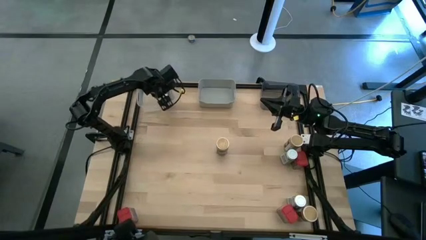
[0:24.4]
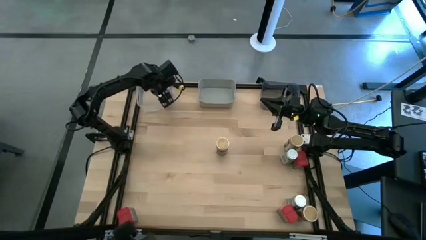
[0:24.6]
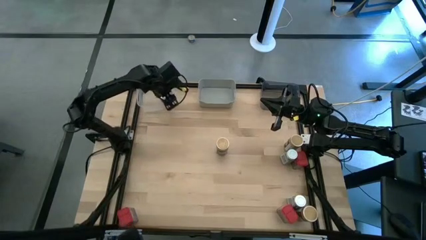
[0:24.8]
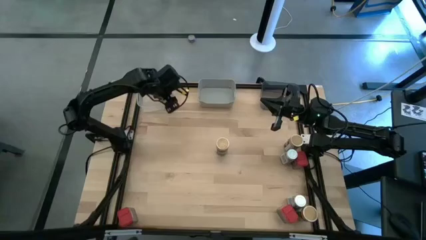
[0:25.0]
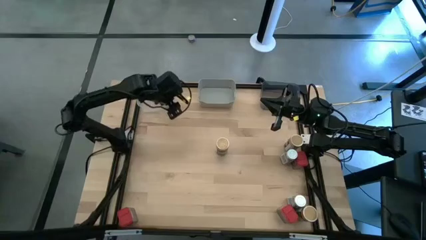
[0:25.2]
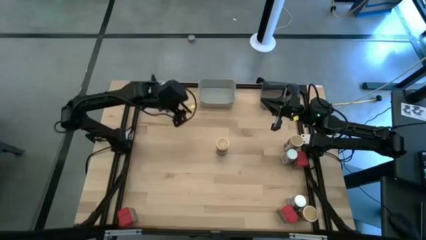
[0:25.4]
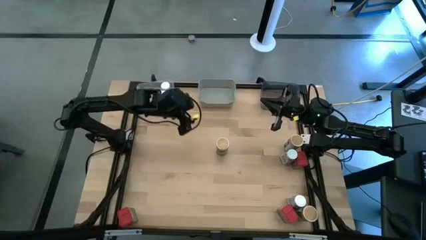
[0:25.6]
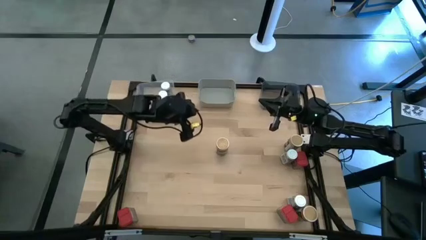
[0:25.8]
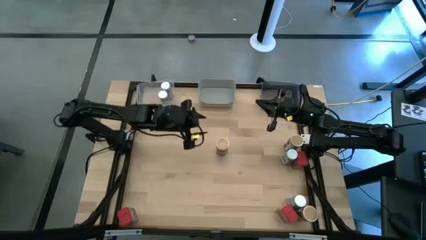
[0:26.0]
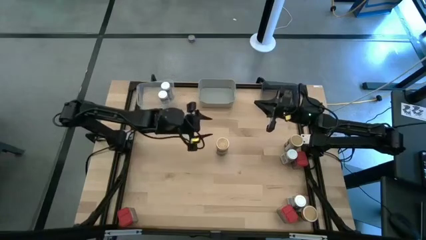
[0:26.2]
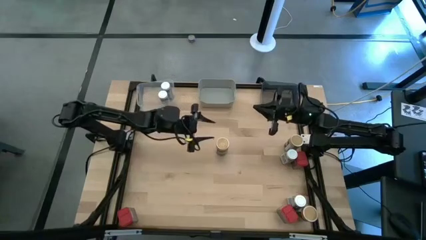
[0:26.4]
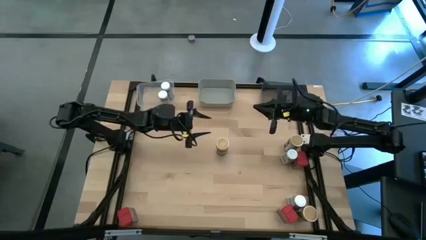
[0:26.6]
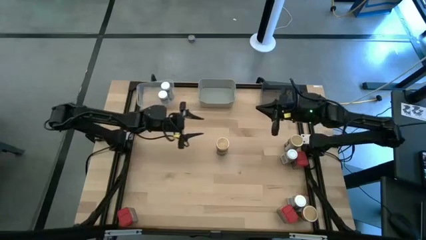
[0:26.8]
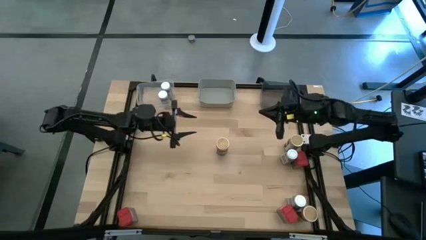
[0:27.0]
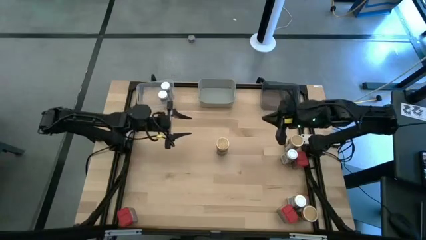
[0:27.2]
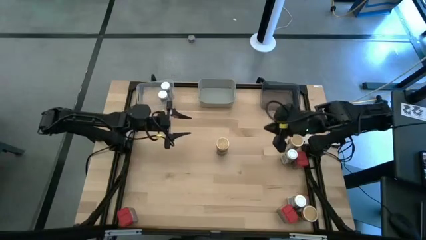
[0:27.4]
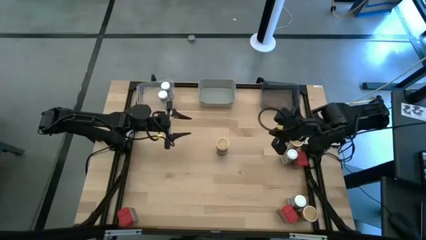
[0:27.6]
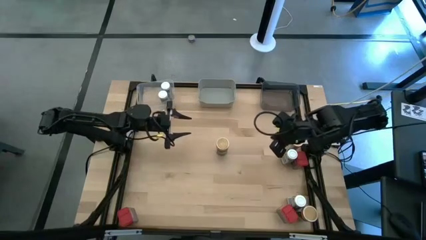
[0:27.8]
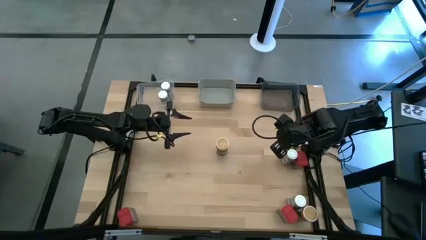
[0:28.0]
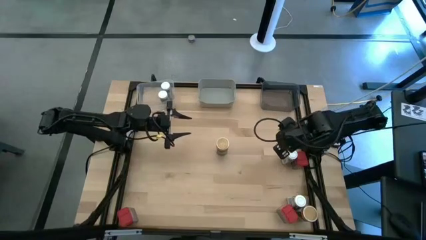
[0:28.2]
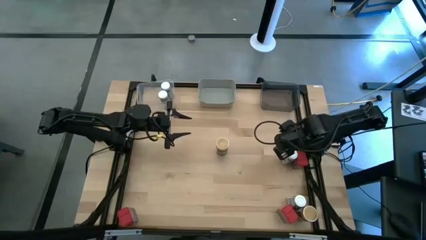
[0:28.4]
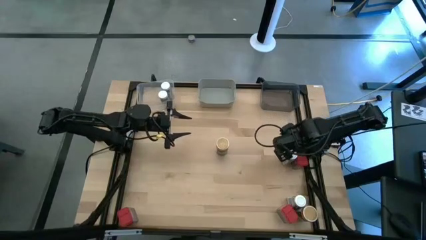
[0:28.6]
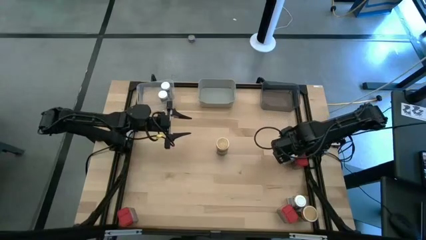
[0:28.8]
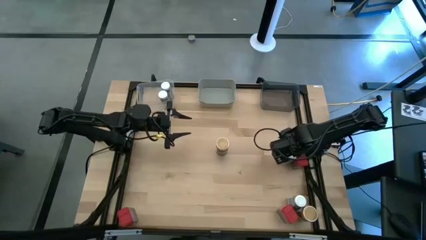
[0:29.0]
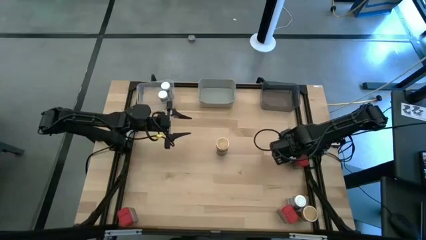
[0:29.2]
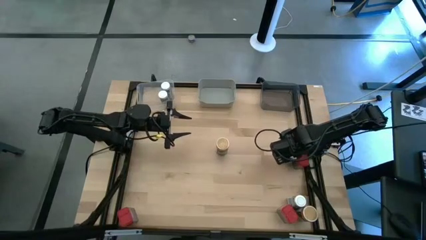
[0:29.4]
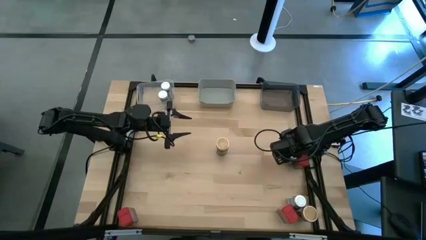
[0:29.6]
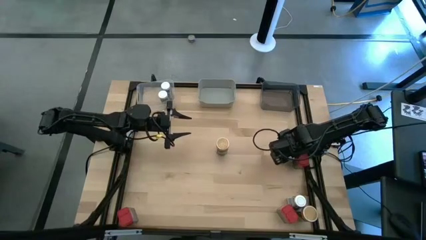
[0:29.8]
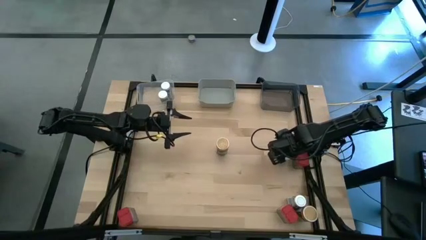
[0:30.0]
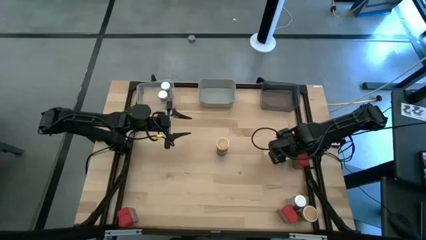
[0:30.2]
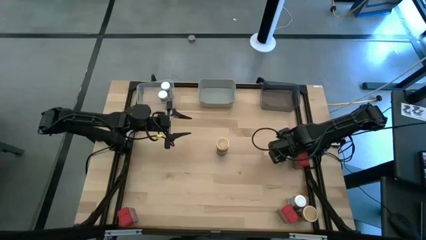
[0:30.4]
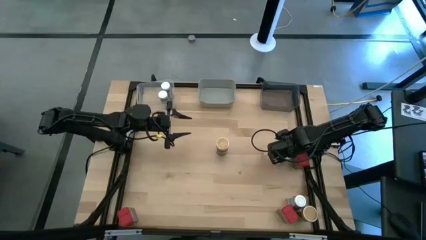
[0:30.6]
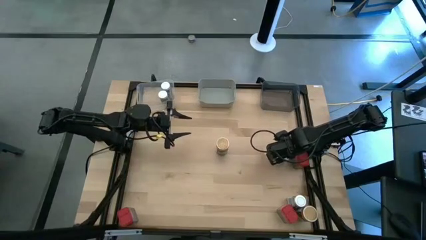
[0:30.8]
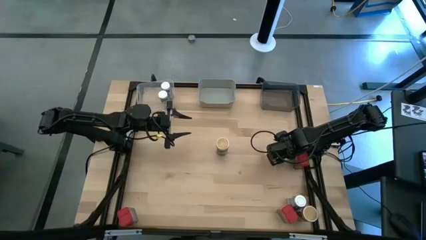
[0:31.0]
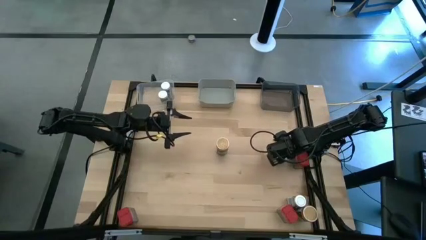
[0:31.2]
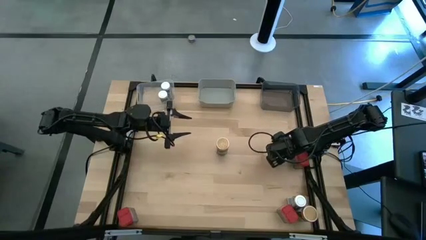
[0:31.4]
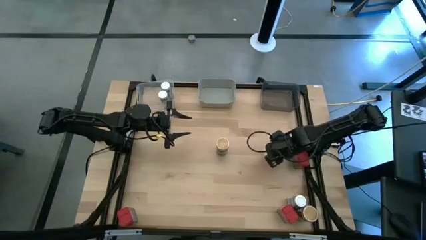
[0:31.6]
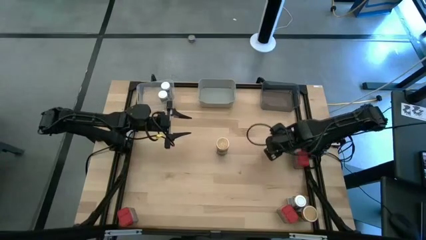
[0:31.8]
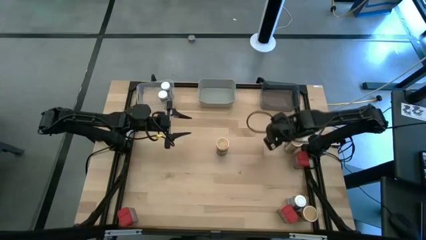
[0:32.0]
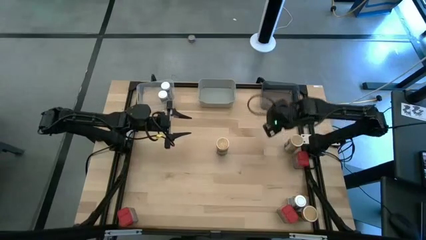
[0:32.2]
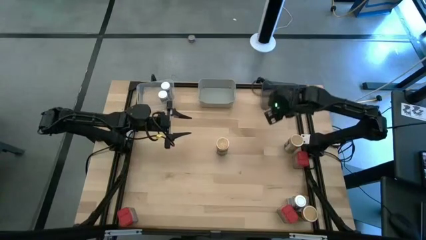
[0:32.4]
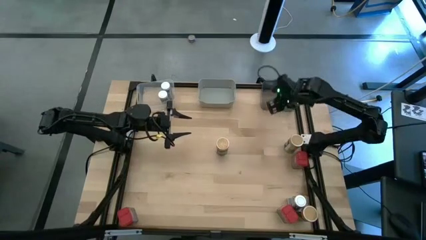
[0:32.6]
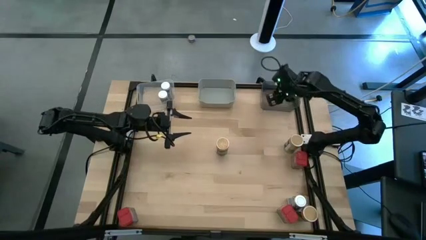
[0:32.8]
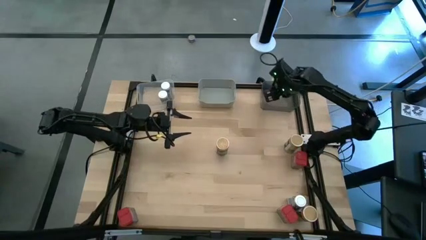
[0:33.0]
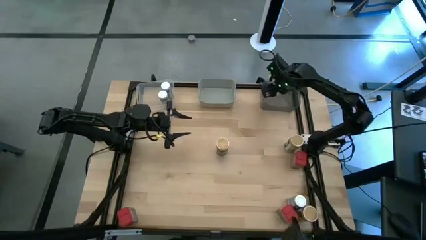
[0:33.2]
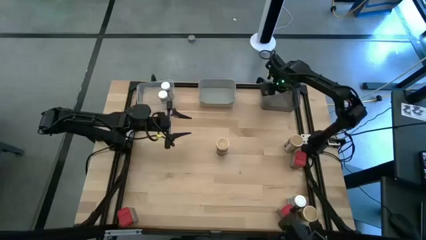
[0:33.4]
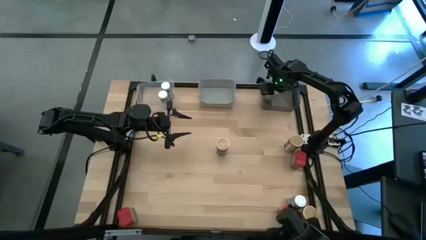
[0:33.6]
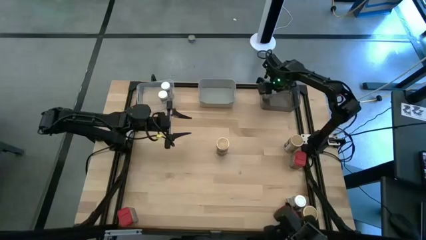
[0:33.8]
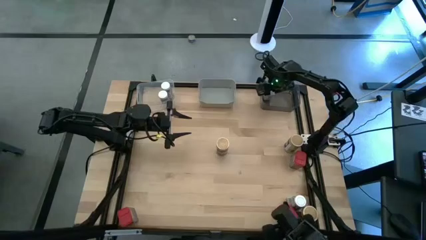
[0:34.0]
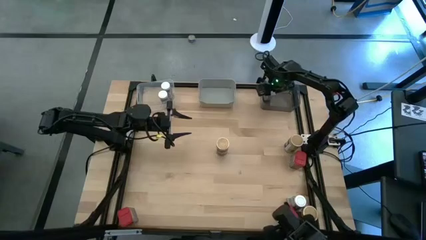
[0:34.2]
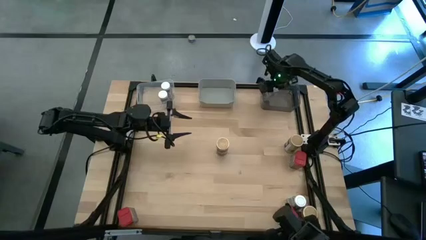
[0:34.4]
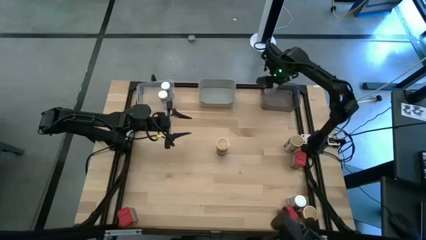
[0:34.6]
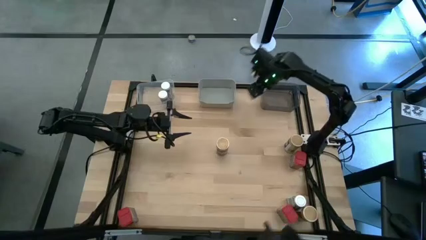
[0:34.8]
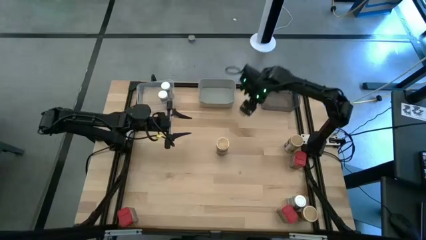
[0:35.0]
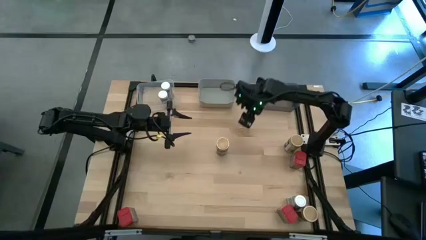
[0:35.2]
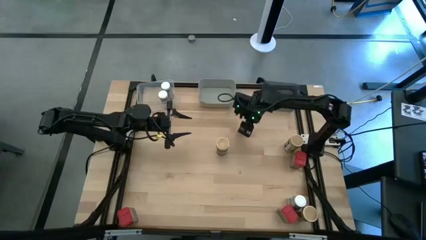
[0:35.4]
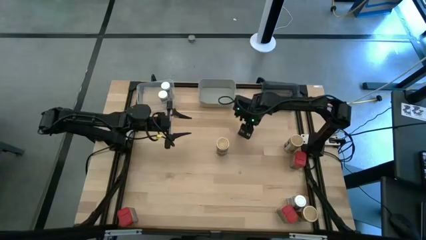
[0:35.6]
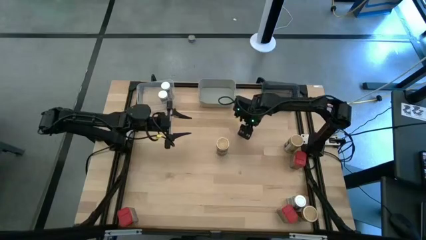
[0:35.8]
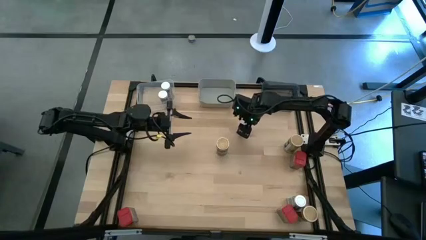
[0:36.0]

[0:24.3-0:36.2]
Task: Sort spices by type
Put the white seasoning bottle into the transparent bin

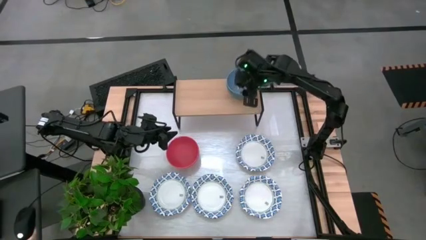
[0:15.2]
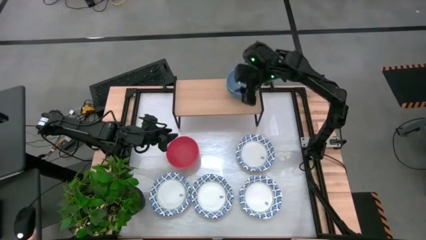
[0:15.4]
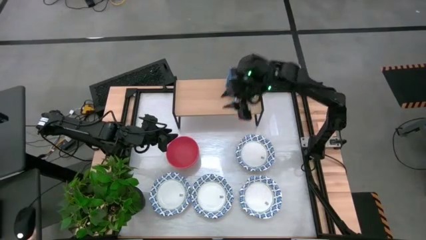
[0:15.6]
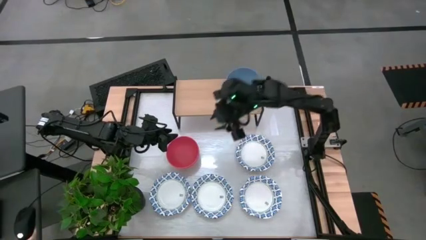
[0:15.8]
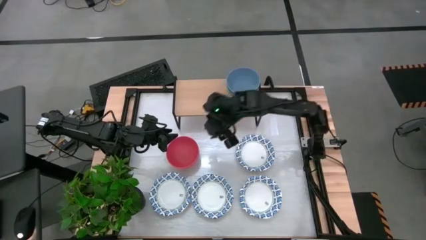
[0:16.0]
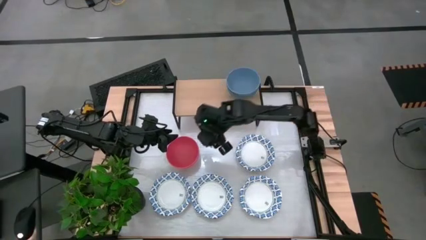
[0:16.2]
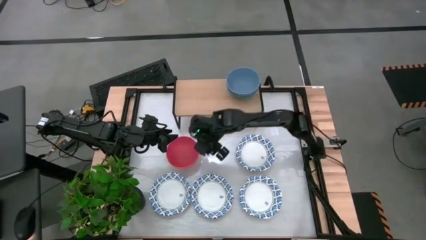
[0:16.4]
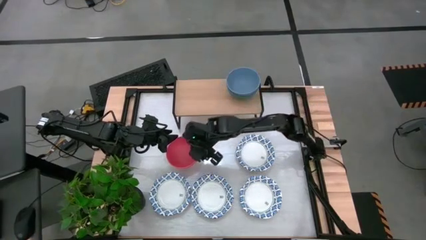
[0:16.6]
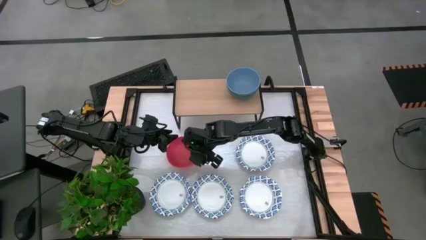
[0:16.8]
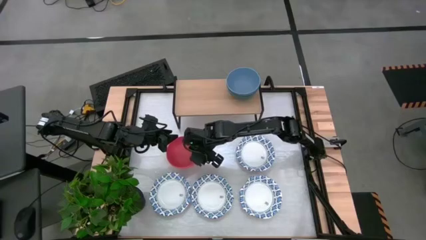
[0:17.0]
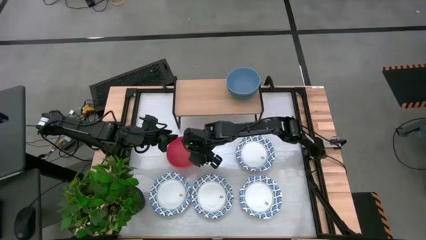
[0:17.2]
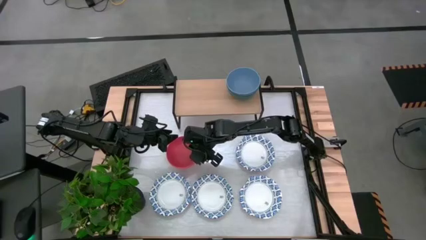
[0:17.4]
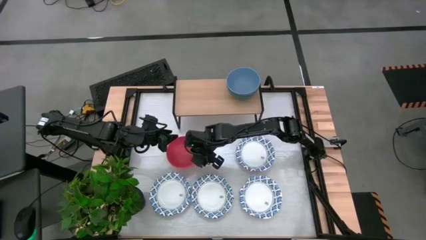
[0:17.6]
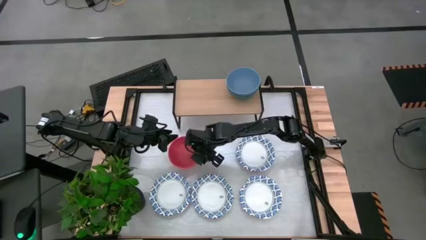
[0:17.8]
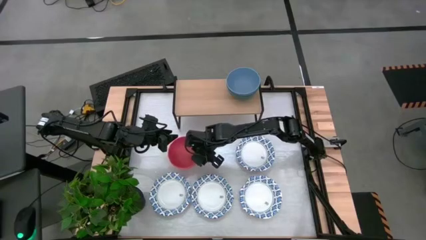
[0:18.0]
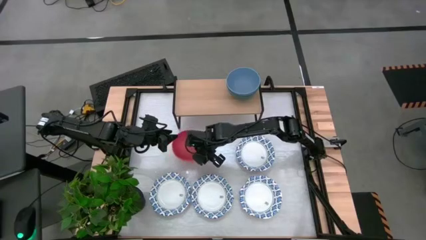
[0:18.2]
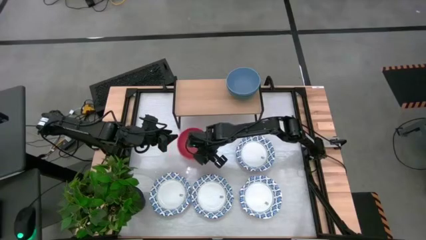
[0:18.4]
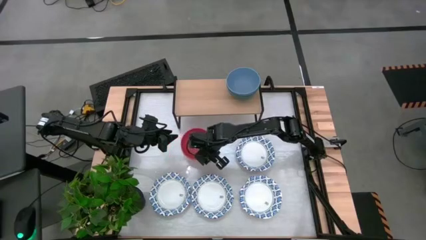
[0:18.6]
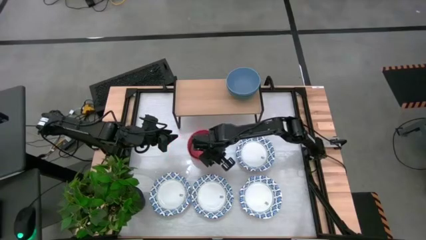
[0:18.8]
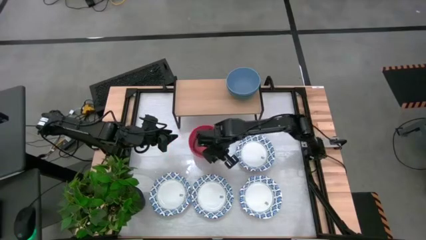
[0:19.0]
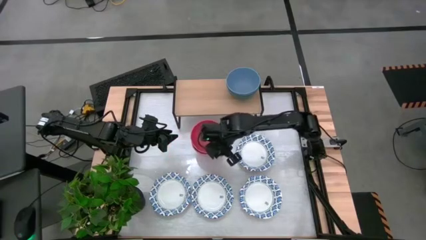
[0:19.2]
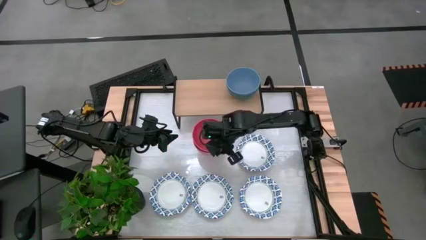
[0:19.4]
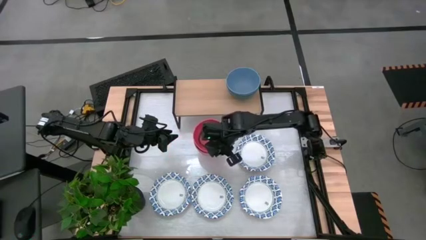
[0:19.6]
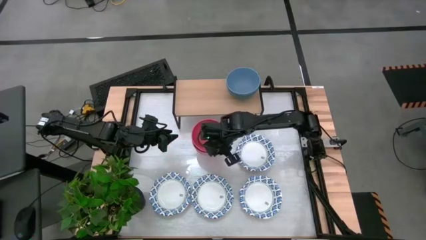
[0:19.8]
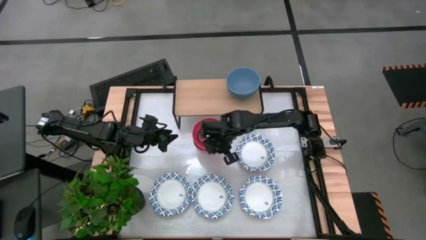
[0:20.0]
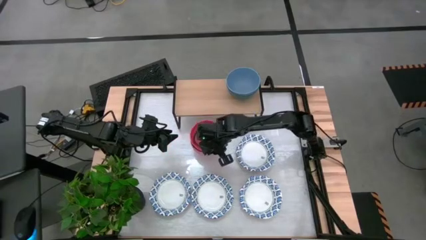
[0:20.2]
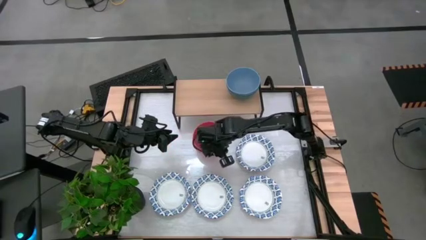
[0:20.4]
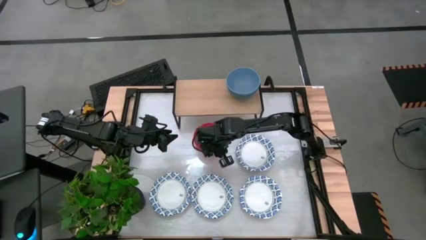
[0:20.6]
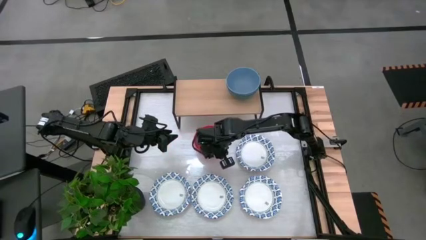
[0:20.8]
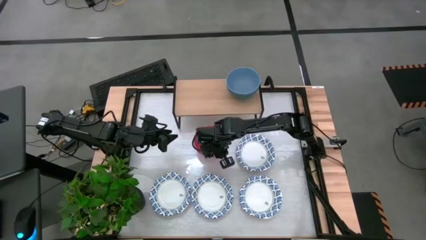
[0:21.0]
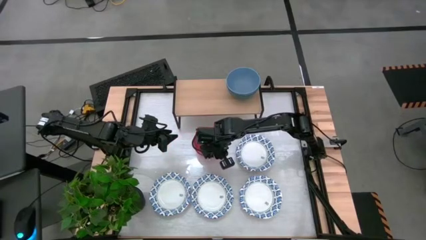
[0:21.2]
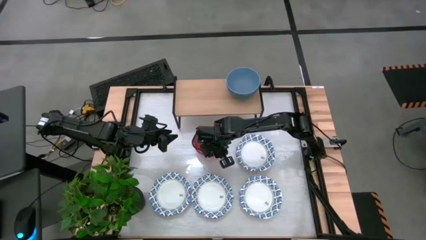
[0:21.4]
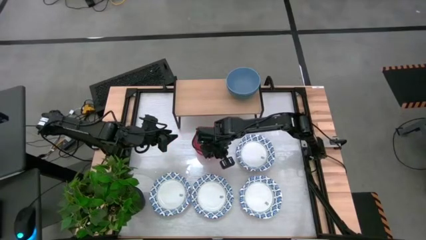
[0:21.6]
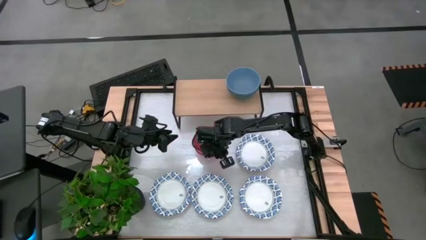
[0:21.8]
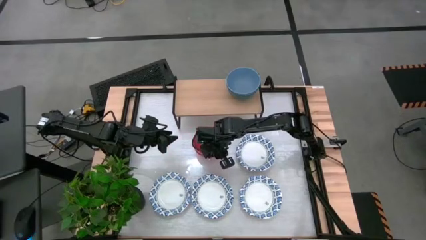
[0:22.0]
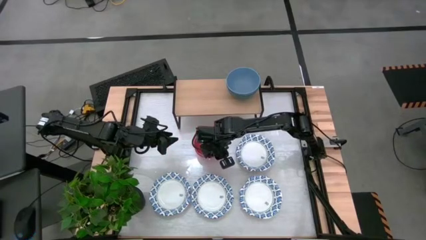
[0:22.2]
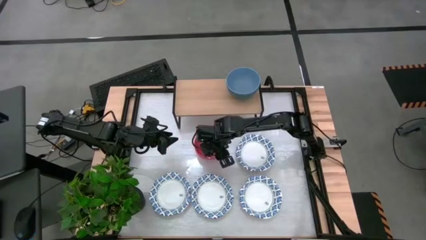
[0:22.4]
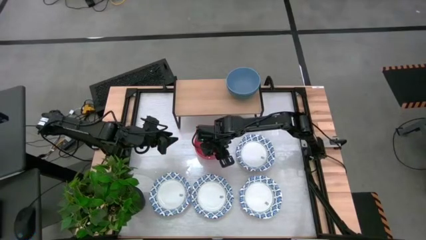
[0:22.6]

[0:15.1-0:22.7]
Task: Place and stack bowls onto a shelf
Stack the orange bowl on top of the blue bowl on the shelf
